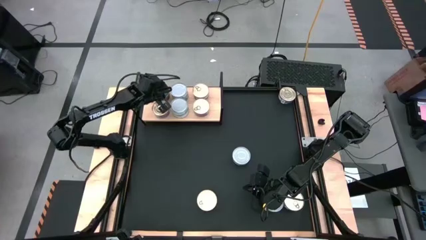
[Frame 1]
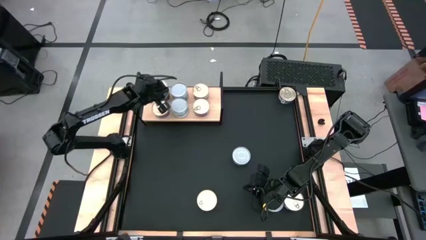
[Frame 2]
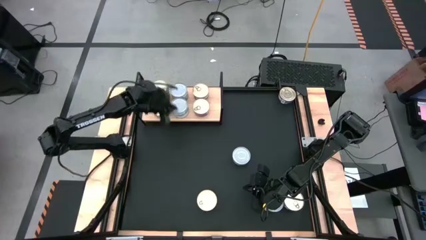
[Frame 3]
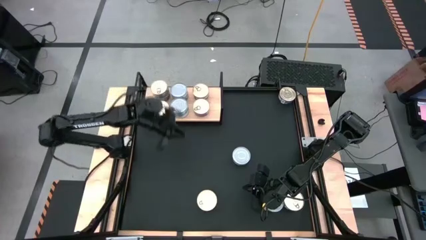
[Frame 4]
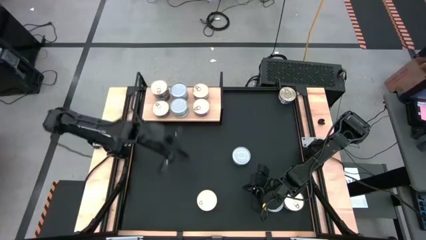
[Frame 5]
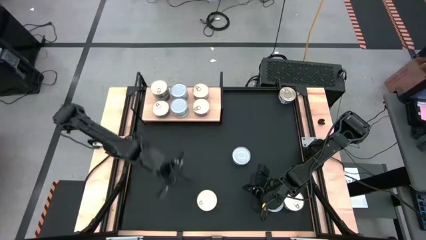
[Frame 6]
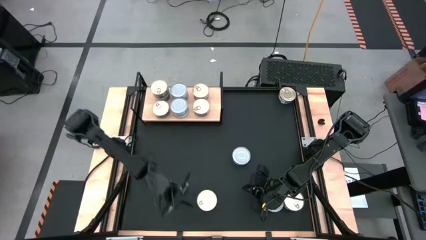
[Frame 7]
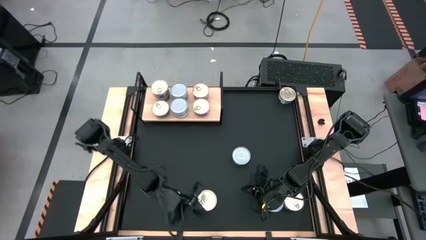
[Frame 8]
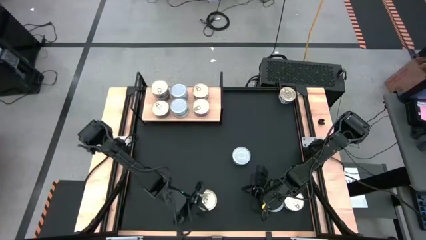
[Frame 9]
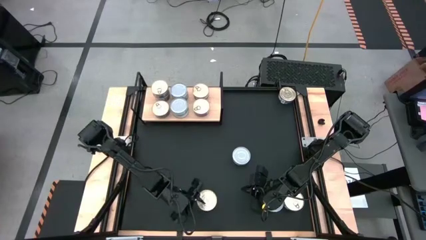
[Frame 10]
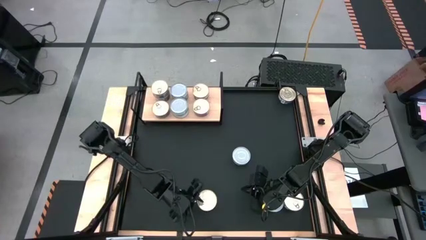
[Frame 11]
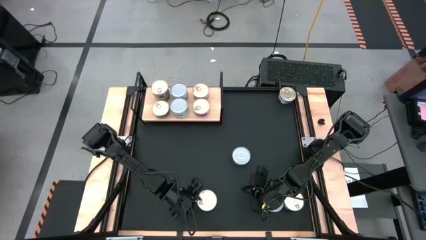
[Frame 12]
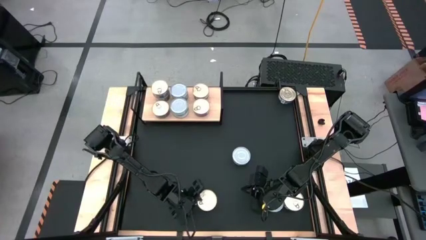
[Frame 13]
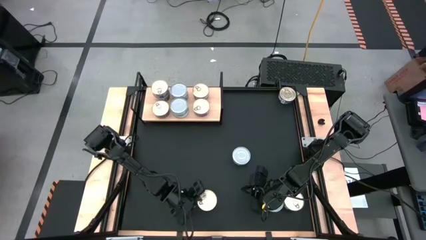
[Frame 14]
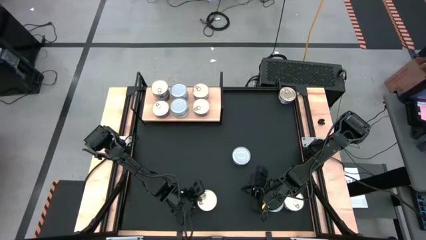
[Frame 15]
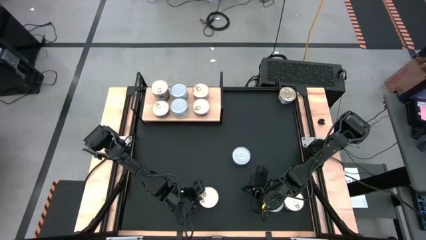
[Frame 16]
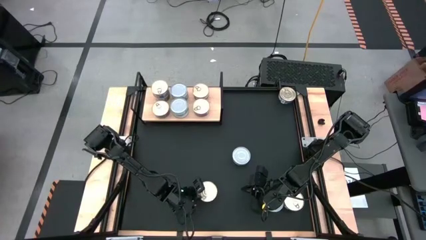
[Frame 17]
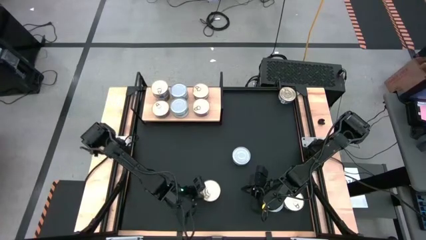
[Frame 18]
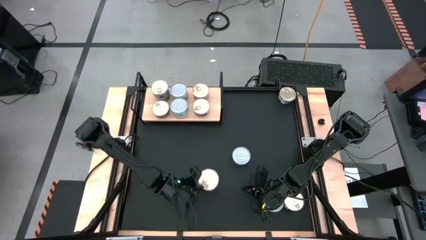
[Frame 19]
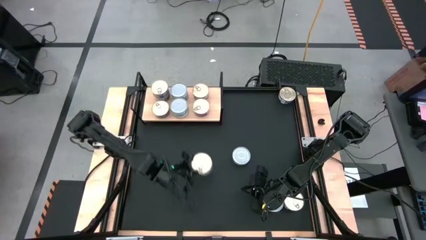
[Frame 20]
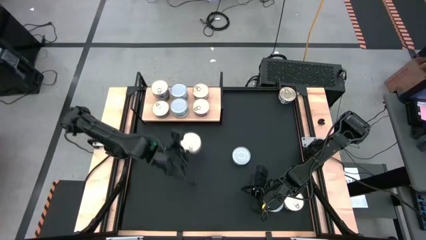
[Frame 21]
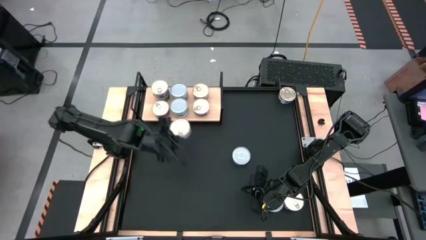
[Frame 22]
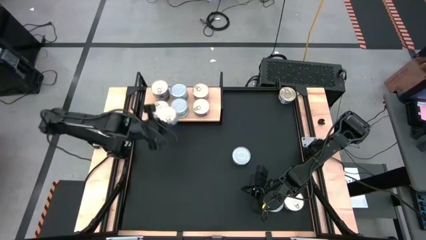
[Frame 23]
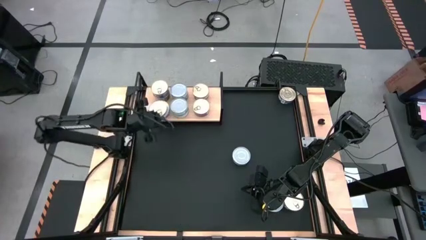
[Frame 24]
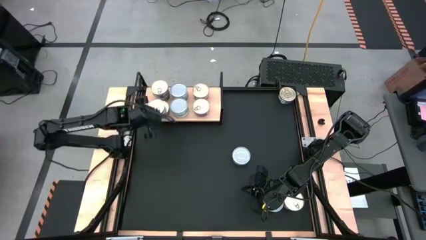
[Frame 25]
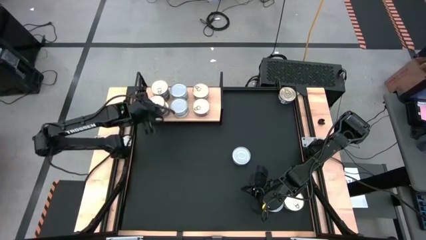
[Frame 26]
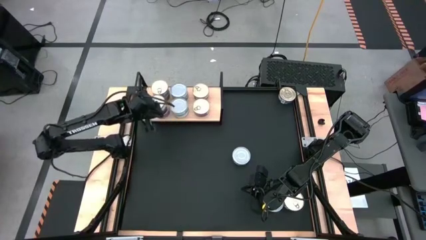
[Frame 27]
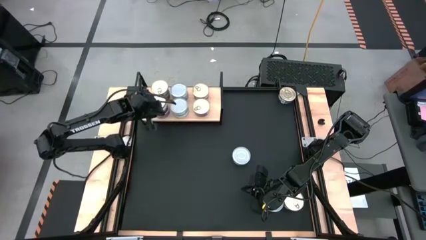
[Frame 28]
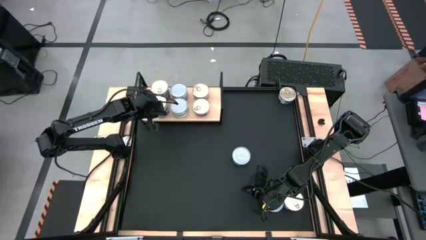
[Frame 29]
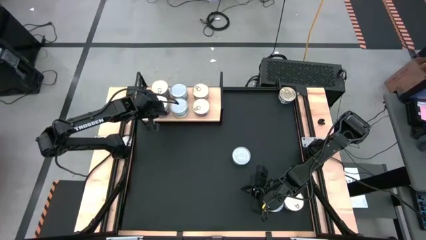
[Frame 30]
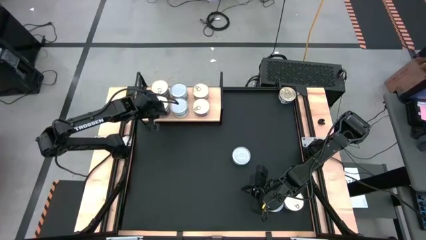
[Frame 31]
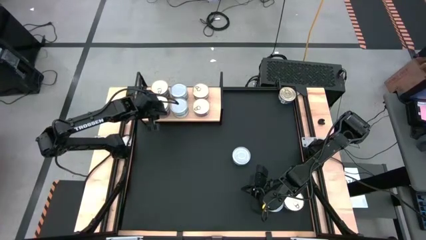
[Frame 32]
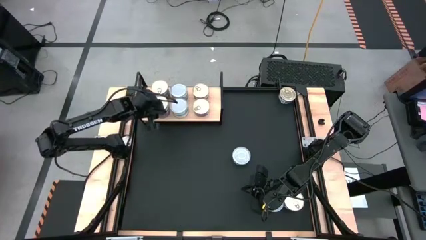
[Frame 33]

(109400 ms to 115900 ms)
Task: Stack canned seafood by type on shelf
Stack the blue tuna can on top of the blue tuna on the shelf

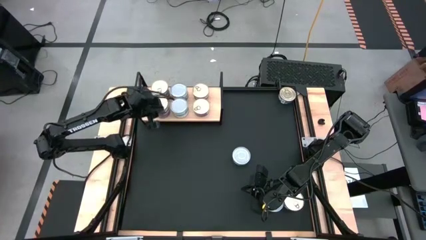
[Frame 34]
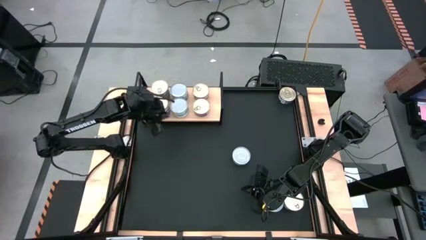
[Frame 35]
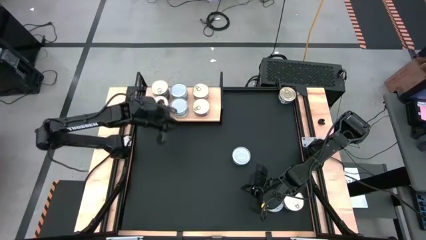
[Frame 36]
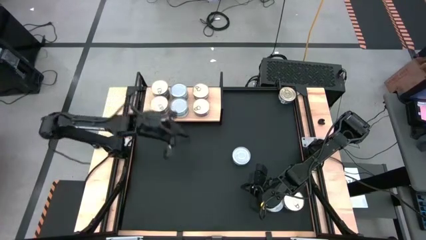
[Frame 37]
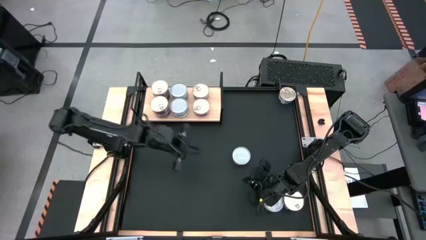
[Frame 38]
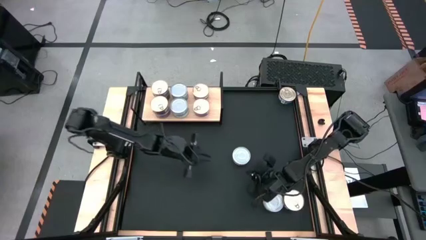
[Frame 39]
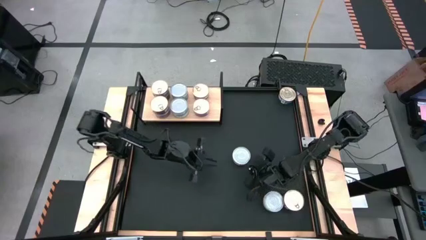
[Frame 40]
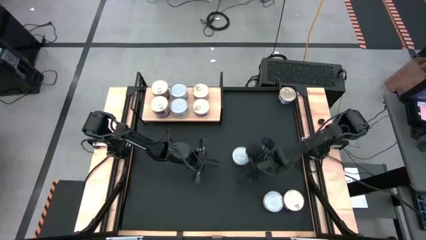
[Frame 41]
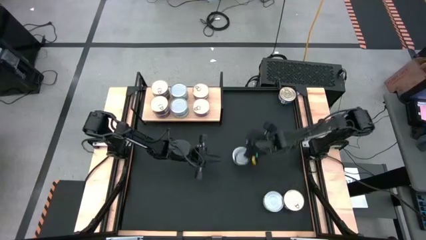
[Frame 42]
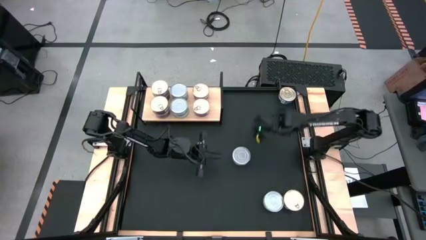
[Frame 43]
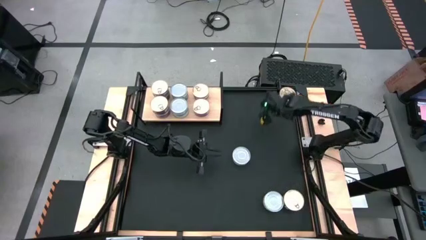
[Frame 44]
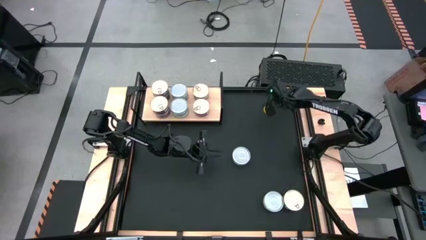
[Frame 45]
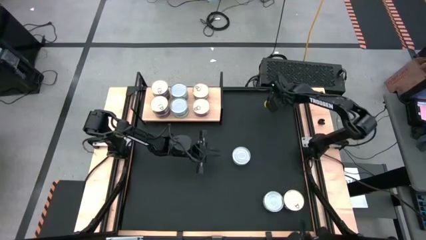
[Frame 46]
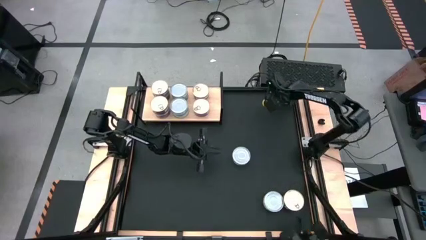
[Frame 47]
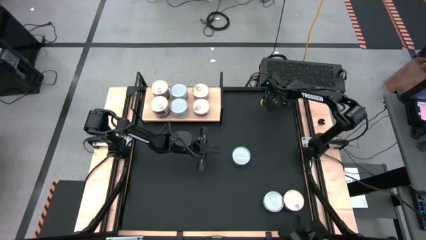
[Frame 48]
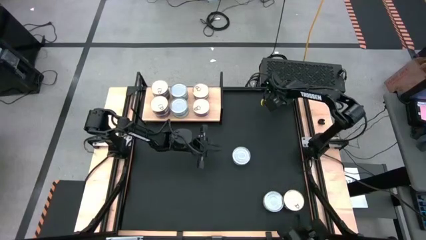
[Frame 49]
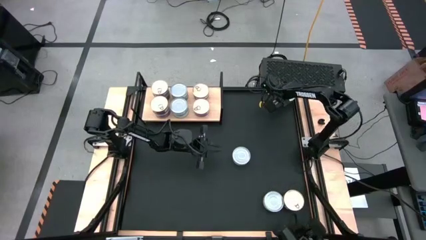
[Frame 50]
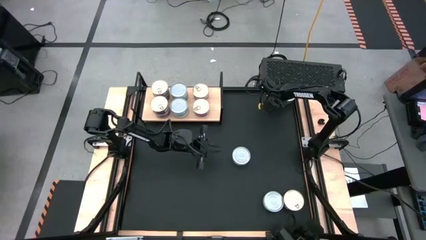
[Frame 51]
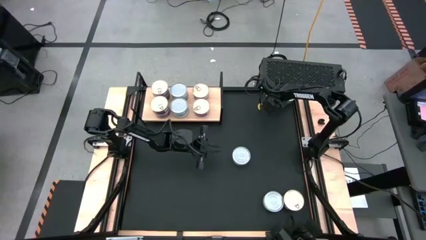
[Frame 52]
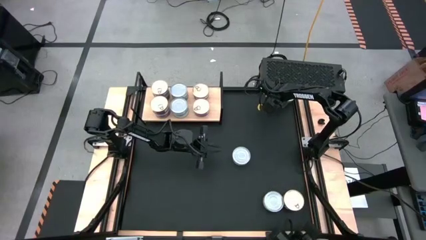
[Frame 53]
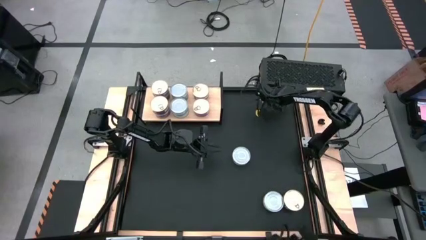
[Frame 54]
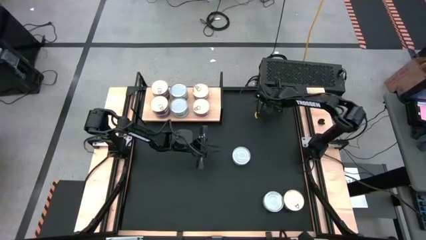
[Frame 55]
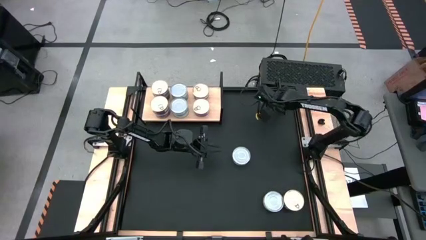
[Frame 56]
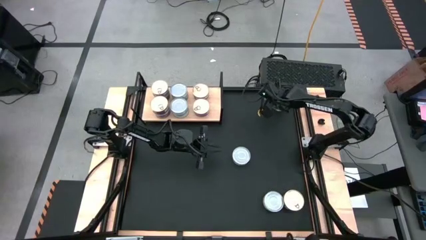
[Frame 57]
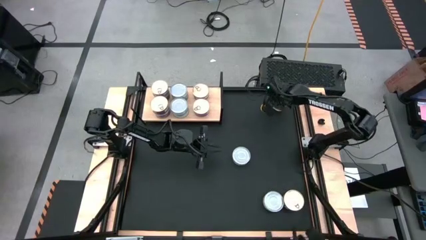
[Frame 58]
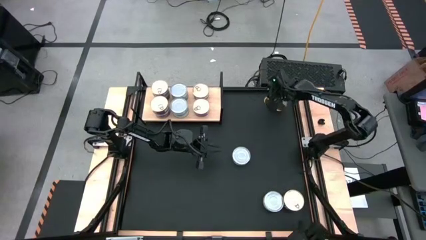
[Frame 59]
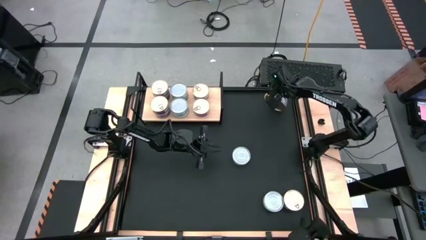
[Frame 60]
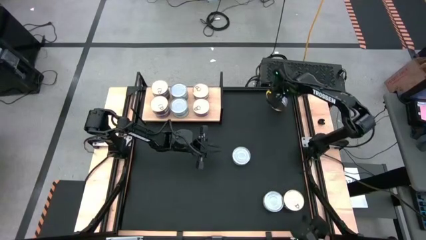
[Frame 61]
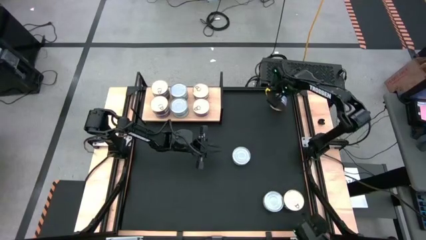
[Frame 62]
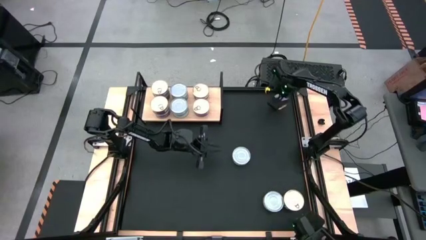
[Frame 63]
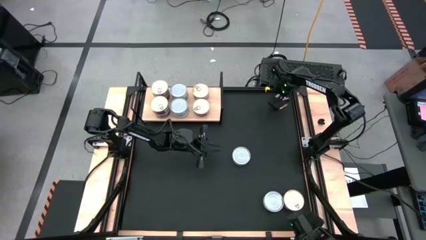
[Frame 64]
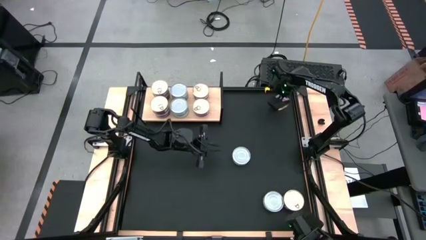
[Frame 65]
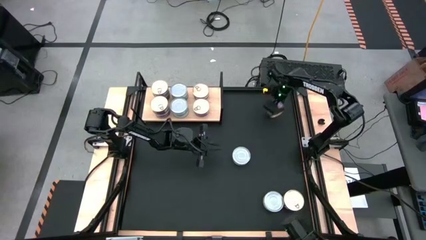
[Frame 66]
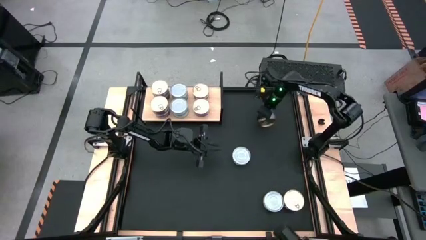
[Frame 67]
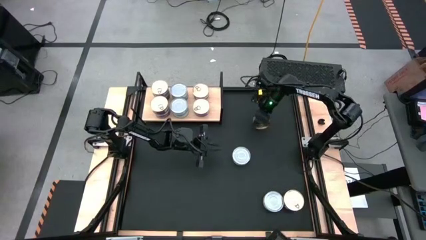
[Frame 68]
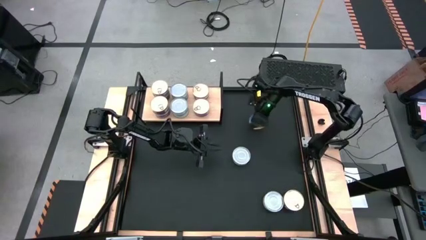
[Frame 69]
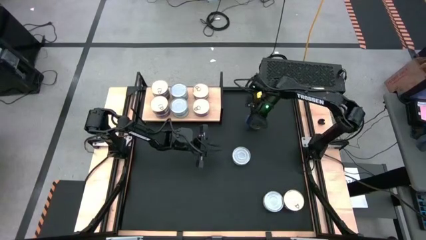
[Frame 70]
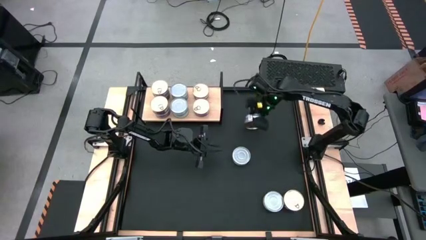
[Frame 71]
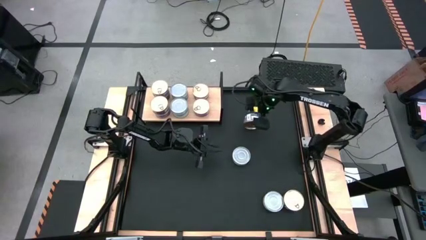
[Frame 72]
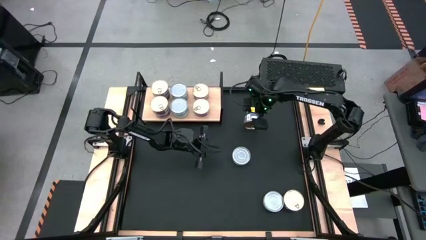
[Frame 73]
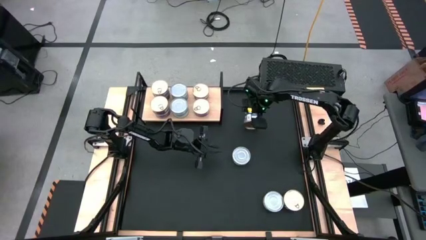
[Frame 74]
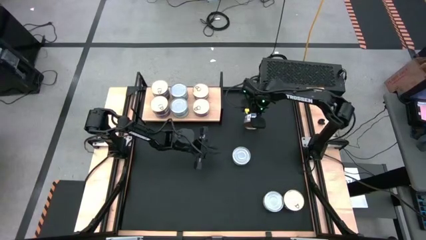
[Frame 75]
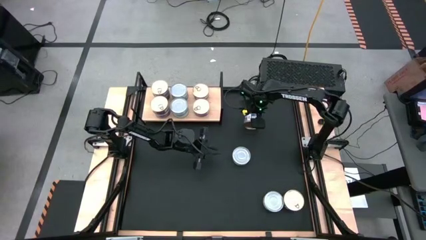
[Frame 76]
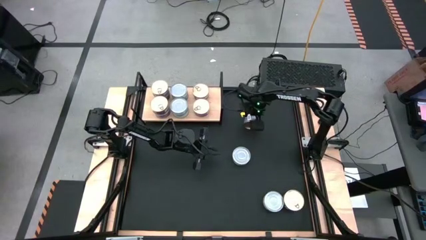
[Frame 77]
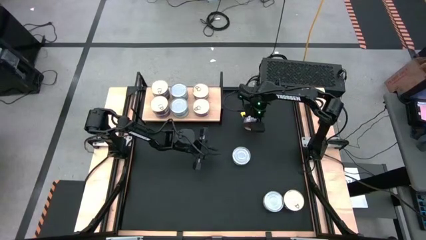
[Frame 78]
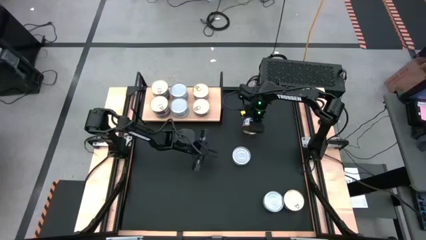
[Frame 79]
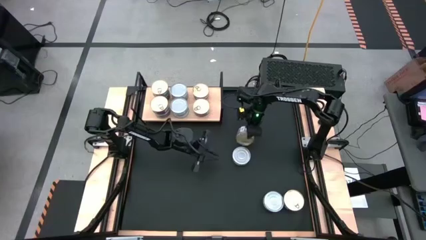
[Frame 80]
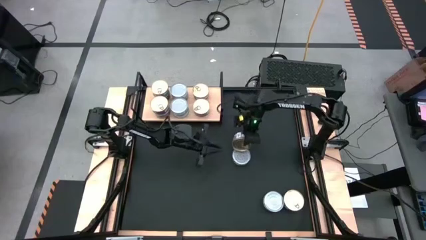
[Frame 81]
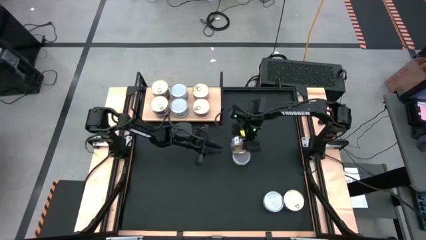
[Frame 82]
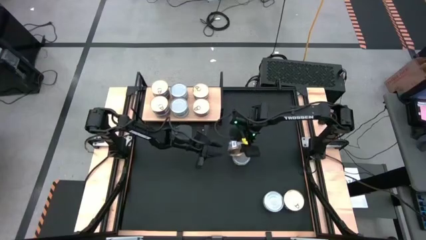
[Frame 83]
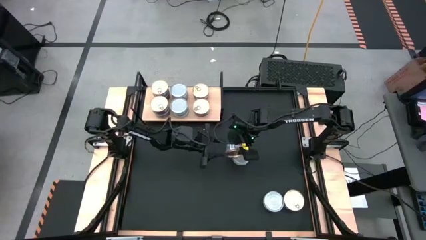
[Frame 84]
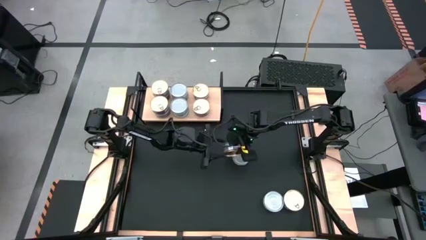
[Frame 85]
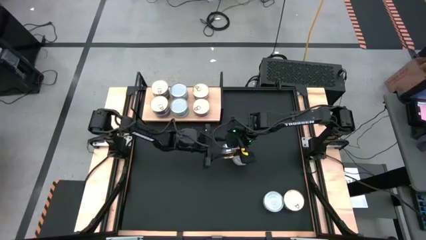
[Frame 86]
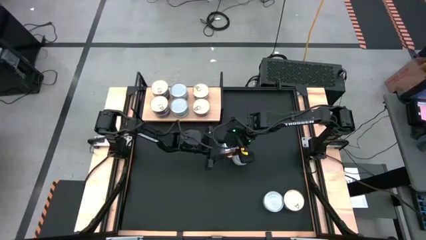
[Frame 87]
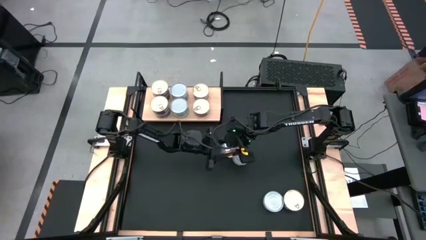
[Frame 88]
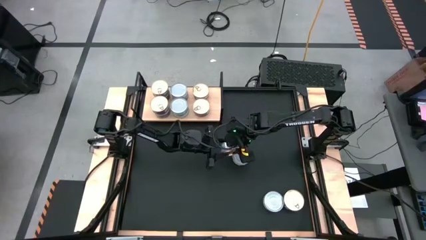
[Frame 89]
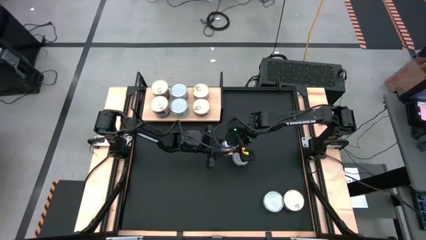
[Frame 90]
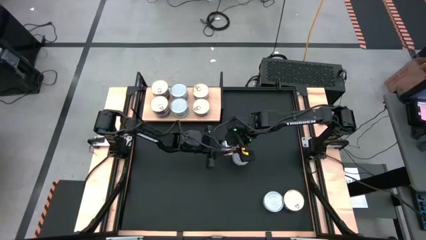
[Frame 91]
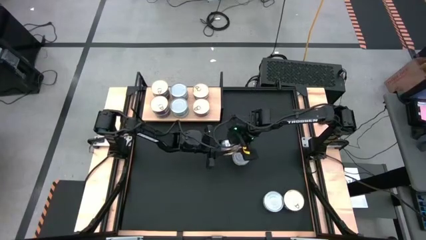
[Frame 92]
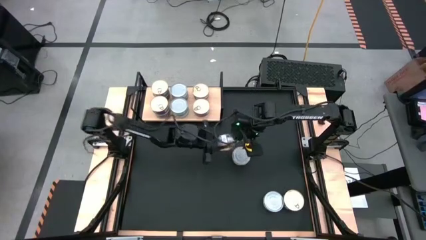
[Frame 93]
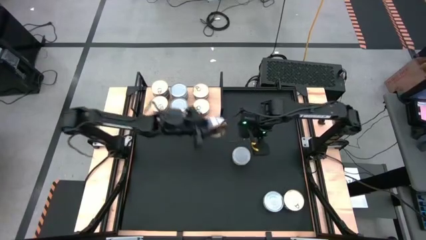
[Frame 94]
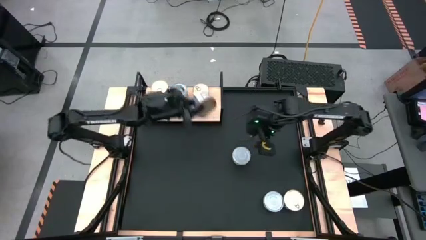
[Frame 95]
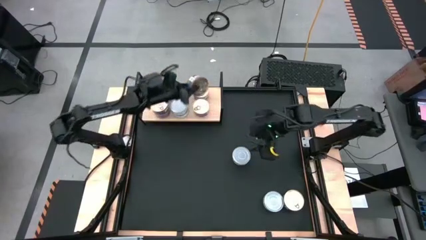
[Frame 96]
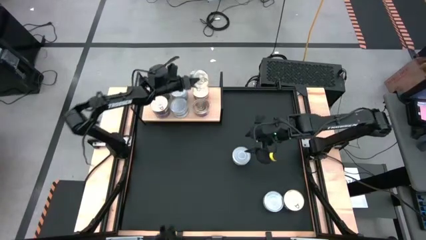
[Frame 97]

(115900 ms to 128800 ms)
Stack the blue tuna can on top of the blue tuna on the shelf
